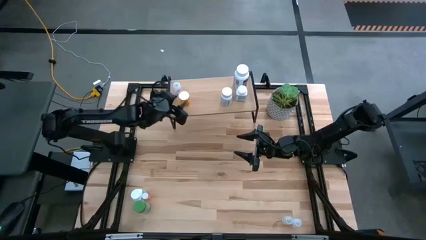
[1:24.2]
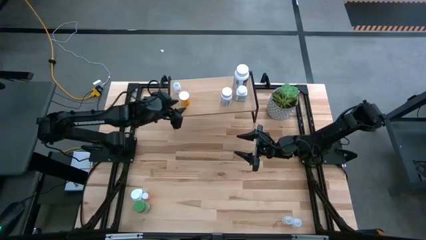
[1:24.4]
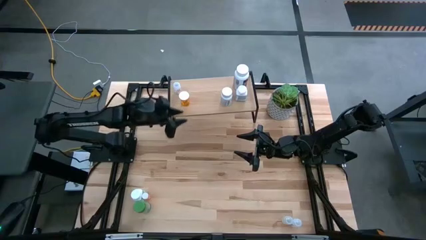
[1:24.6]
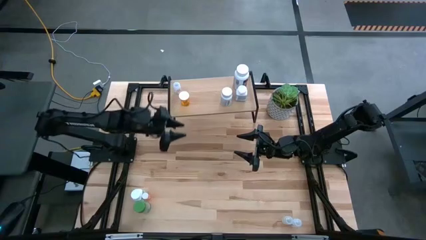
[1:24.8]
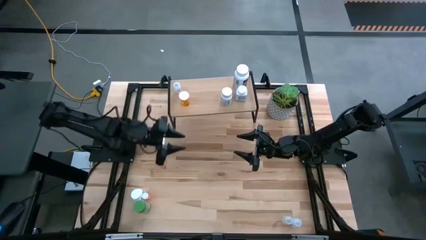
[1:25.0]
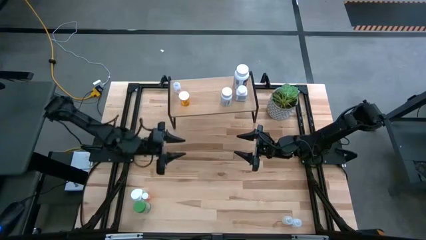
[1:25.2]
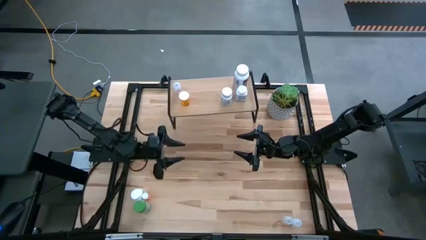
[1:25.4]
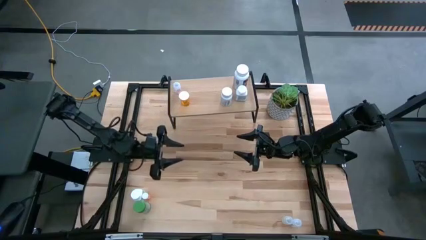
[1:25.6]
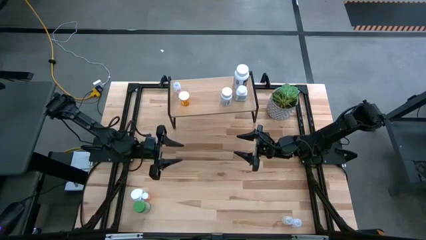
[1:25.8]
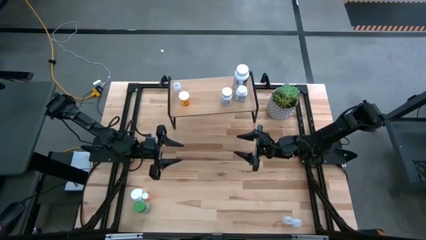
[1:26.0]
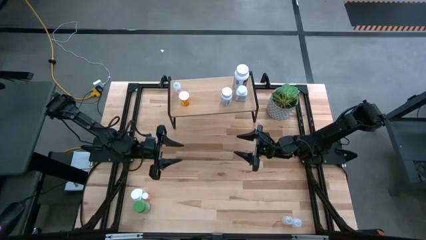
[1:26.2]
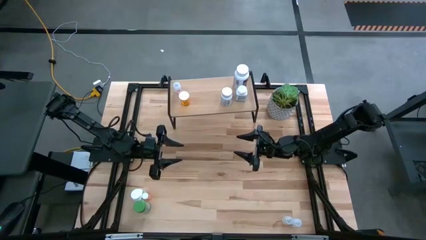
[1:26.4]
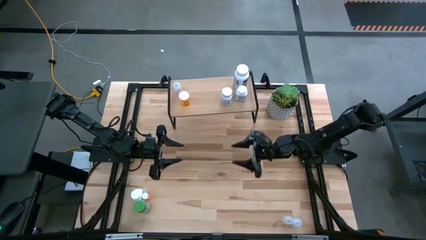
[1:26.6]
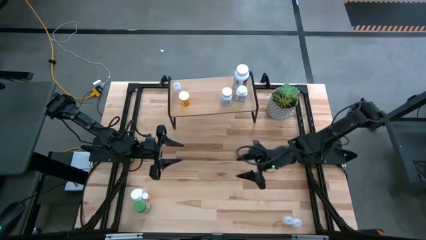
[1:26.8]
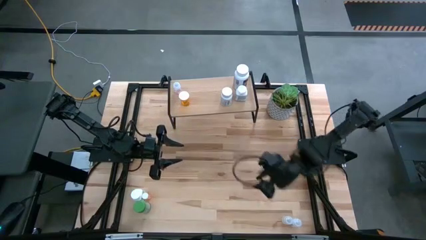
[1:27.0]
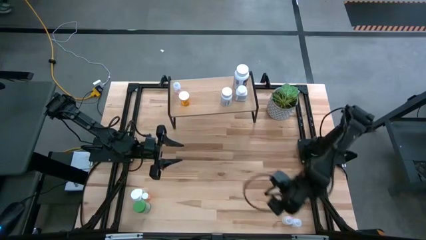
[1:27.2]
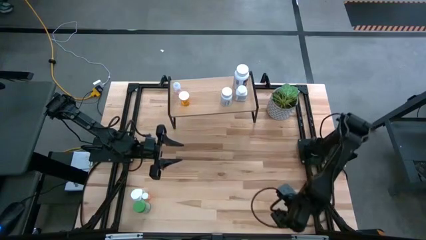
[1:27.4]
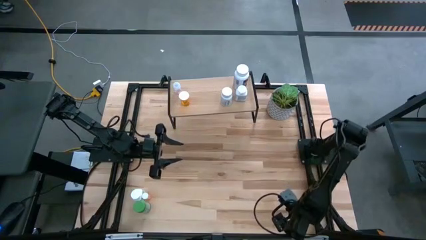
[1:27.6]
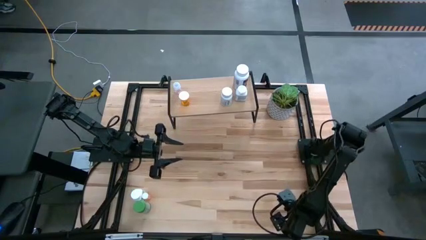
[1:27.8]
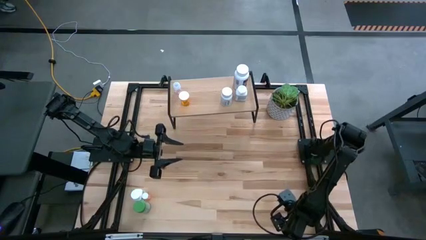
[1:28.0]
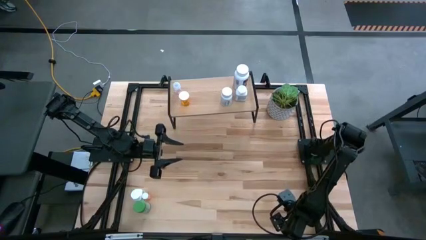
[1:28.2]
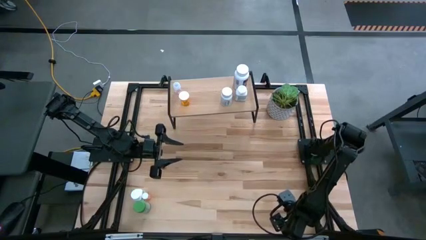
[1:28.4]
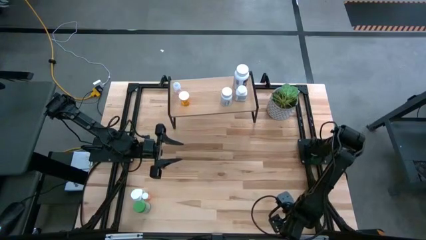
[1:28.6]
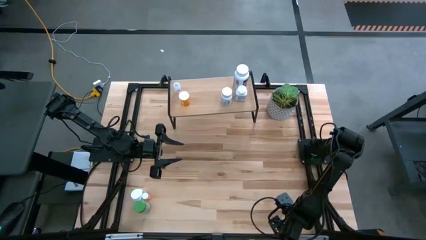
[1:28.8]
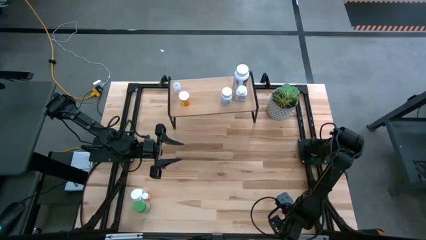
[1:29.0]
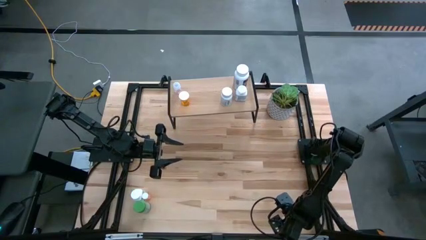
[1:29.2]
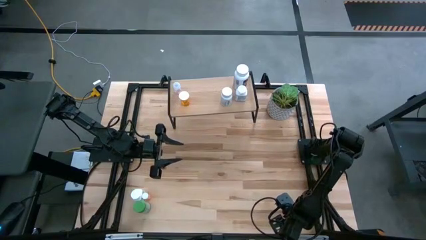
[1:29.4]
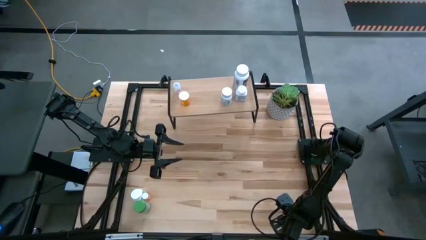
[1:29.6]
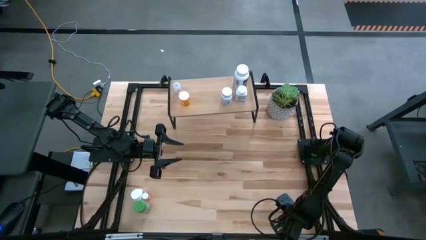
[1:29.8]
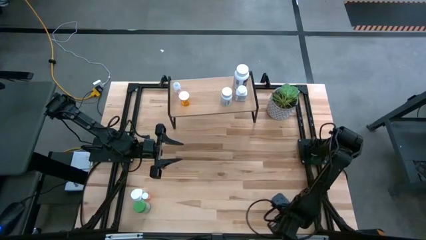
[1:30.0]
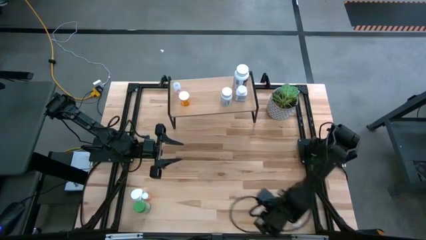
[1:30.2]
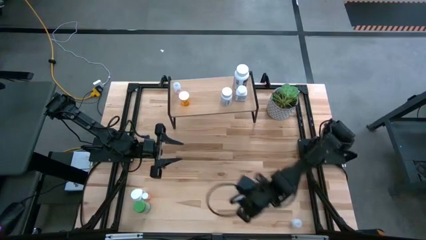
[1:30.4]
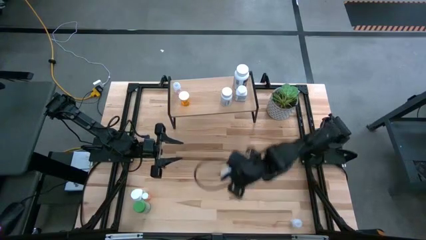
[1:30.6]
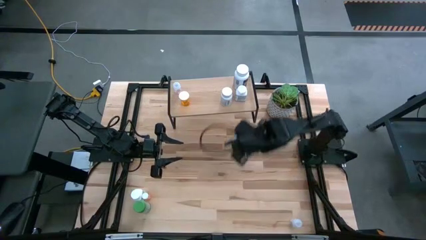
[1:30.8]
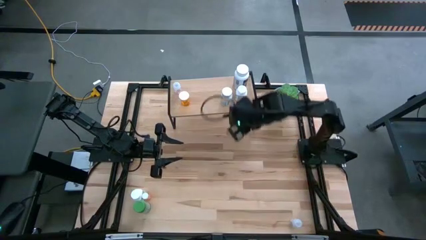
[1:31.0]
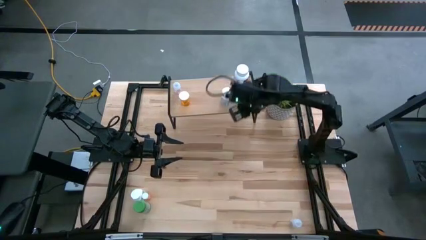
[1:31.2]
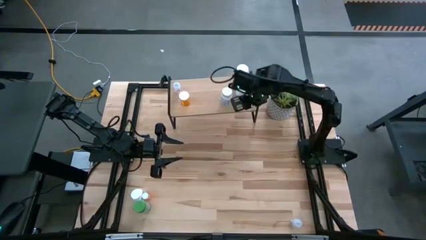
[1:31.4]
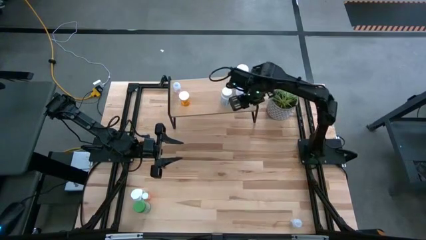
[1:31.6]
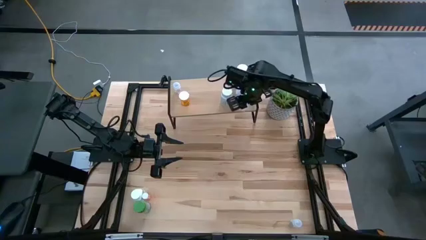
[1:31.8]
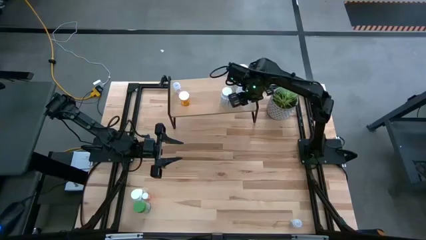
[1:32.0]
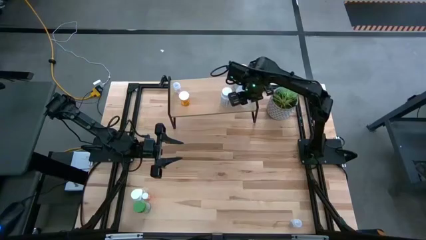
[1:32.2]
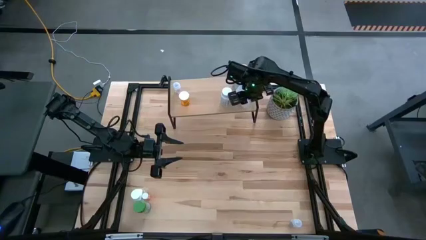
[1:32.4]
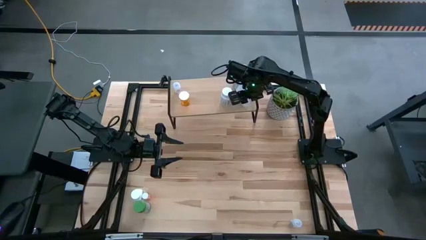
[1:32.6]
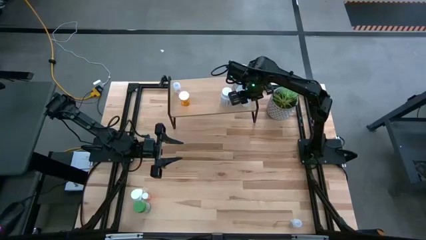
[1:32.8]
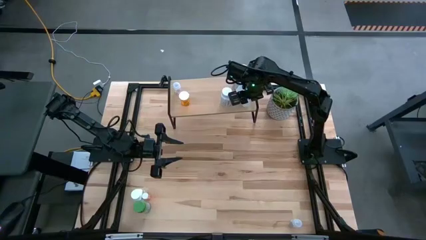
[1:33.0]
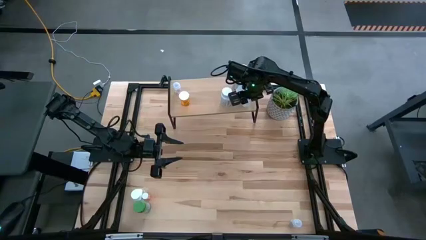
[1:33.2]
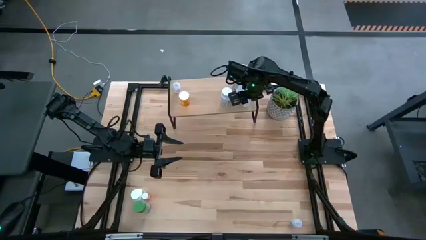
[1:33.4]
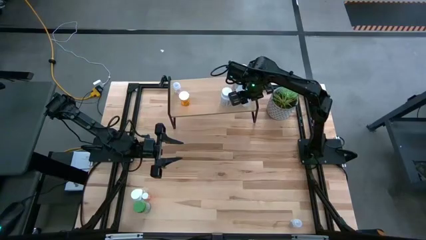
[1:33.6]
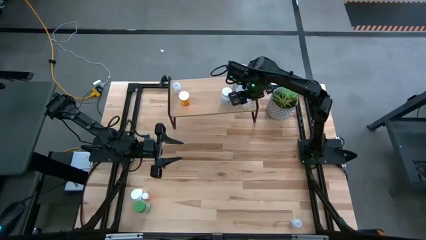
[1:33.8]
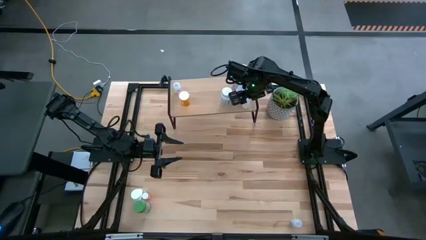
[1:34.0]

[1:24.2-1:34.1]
Task: Pick and place medicine bottles onto shelf by color
Put the left transparent pill bottle on the shelf

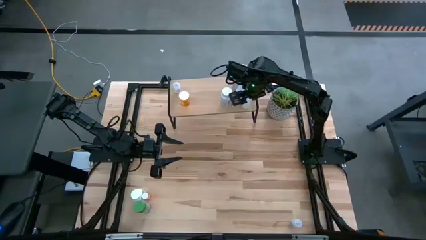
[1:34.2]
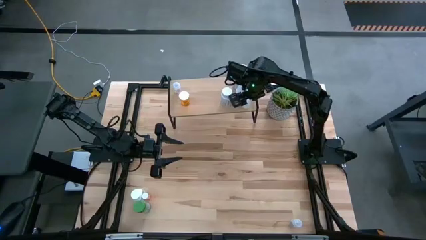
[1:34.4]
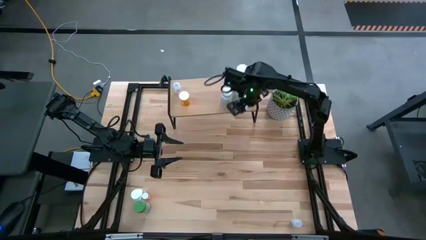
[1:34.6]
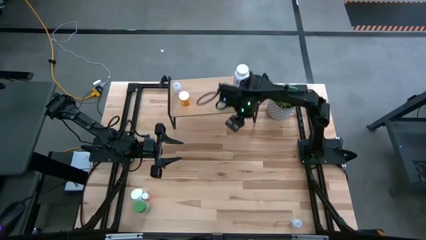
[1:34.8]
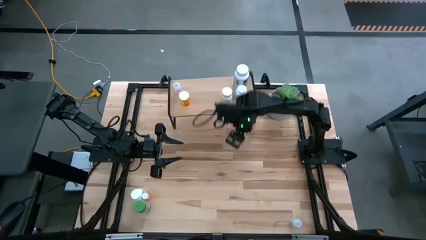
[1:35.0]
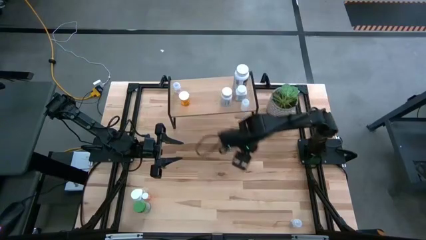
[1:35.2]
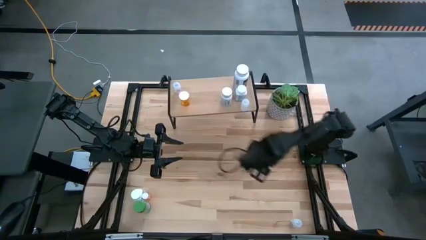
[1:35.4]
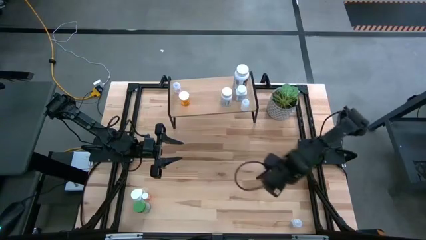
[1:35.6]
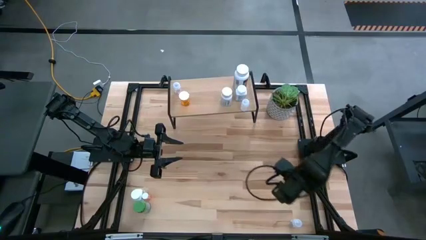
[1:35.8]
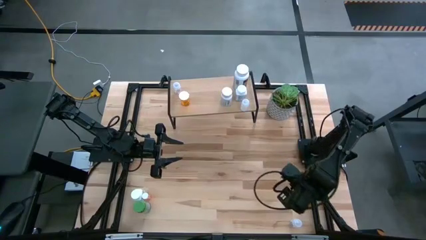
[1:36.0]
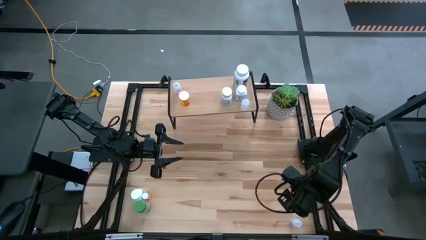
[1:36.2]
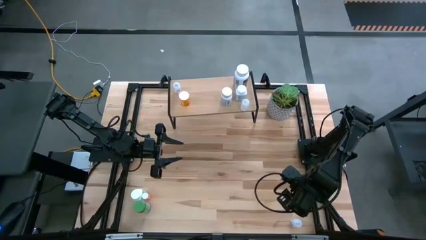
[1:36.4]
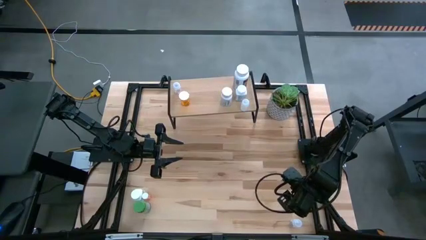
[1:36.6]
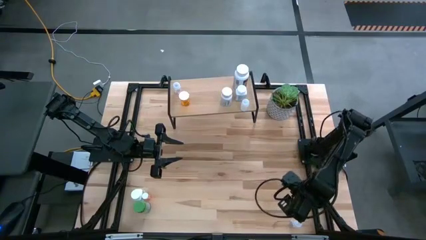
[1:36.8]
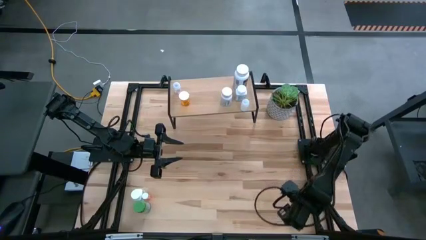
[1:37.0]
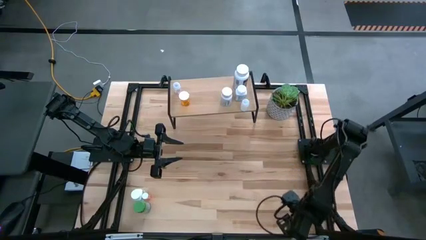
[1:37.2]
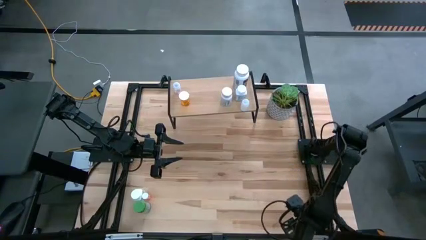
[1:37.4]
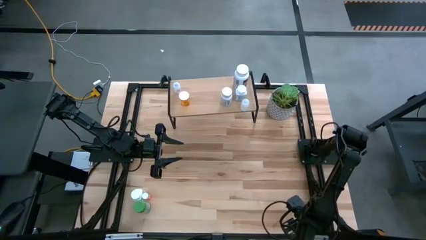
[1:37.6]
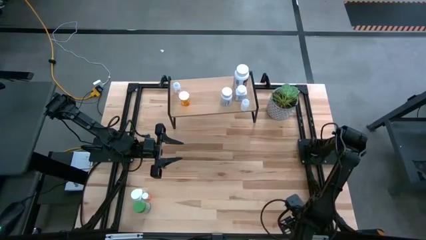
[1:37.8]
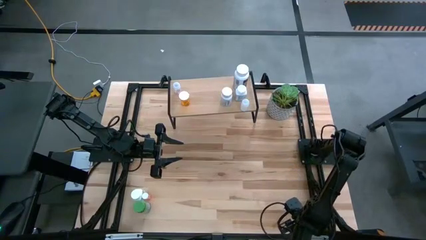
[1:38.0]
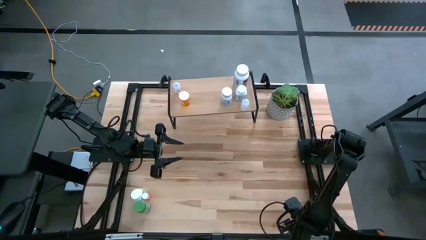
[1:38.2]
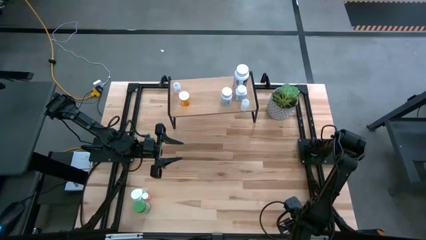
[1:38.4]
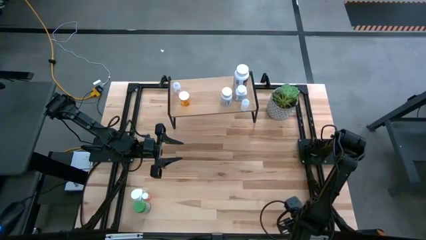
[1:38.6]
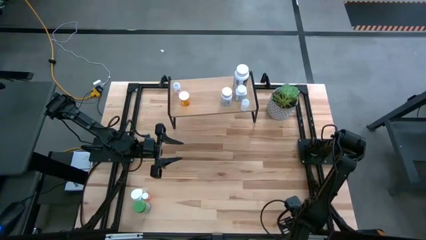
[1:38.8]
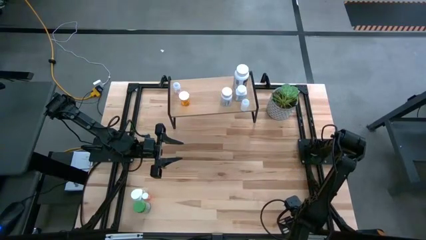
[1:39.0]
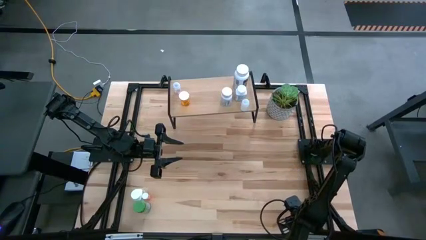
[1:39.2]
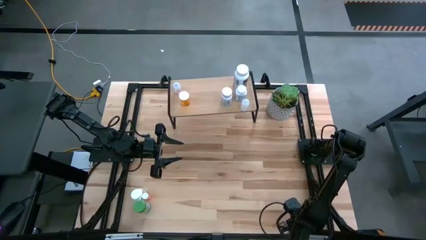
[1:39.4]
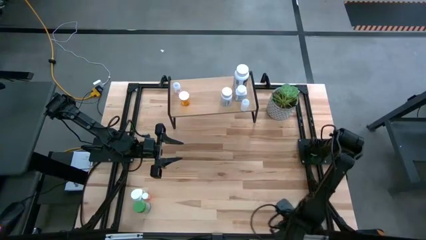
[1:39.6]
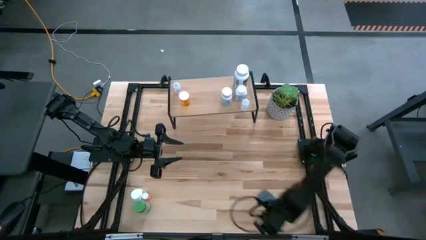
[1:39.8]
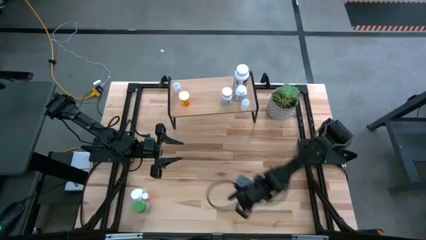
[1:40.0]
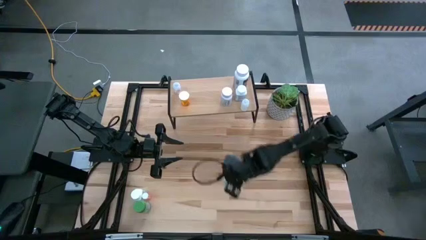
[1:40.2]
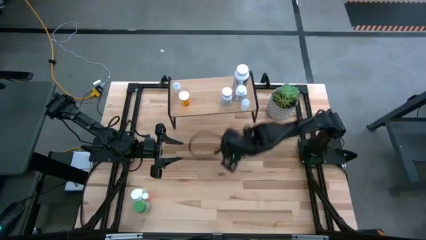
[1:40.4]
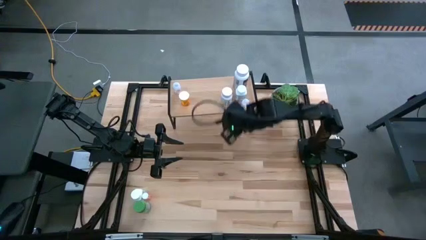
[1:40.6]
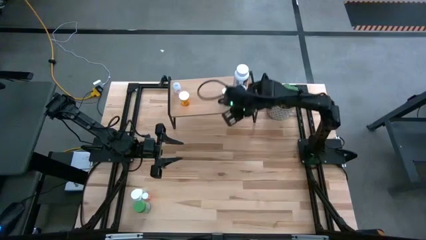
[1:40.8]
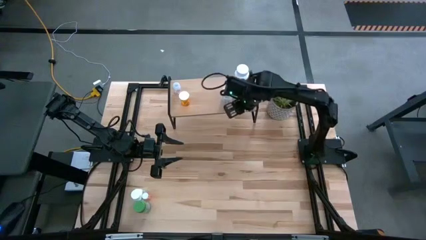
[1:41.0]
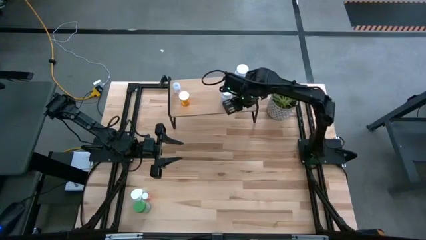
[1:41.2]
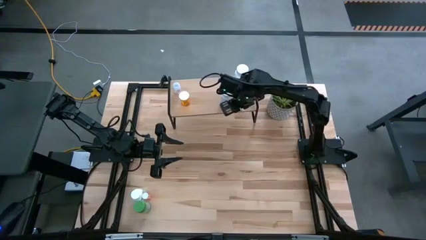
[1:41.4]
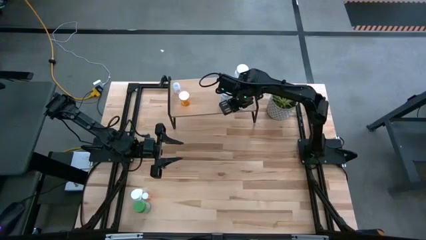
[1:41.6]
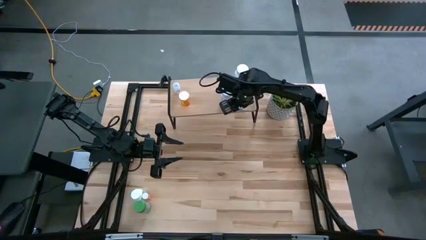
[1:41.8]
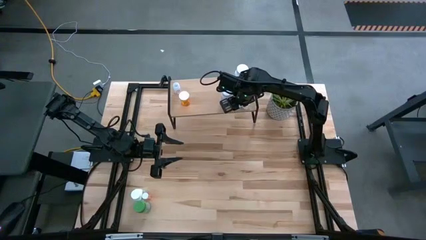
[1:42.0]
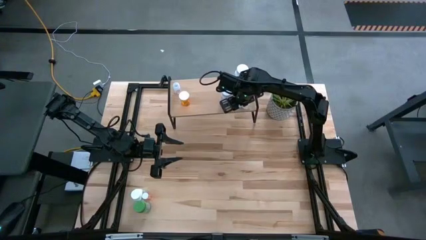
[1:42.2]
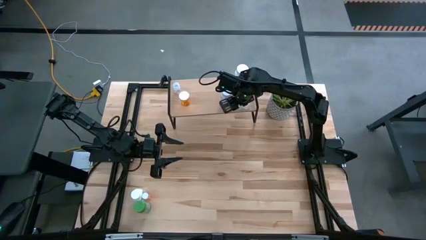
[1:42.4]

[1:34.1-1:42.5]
Put the transparent pill bottle on the shelf
